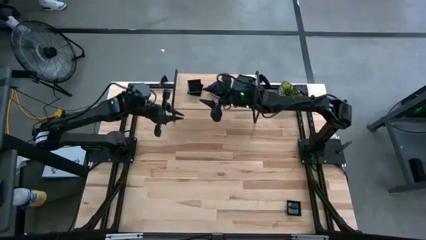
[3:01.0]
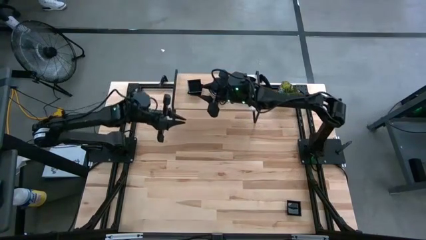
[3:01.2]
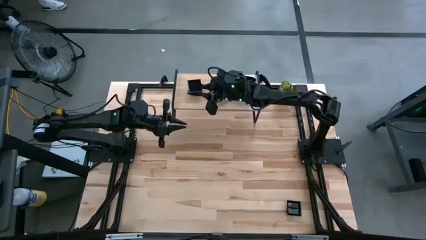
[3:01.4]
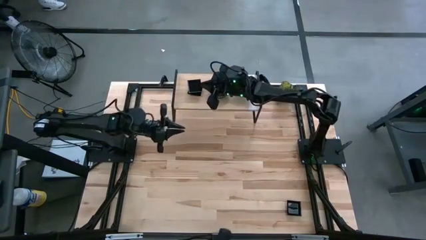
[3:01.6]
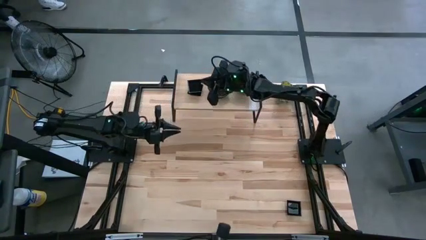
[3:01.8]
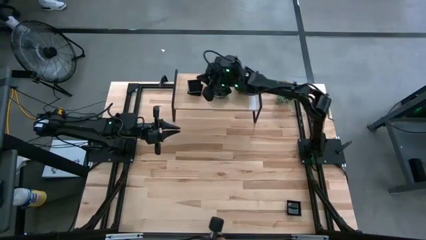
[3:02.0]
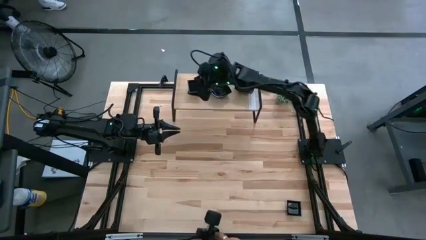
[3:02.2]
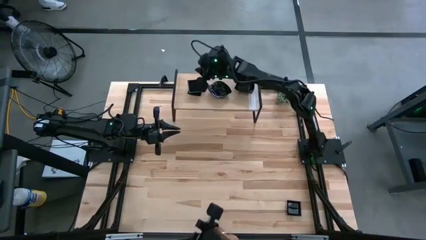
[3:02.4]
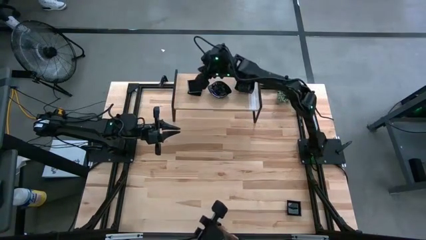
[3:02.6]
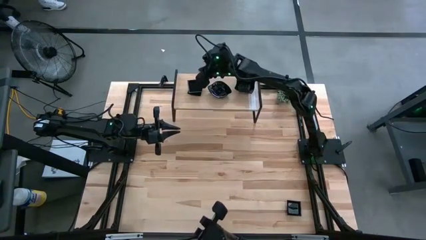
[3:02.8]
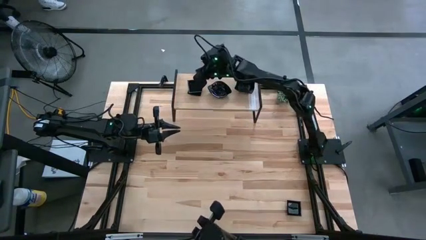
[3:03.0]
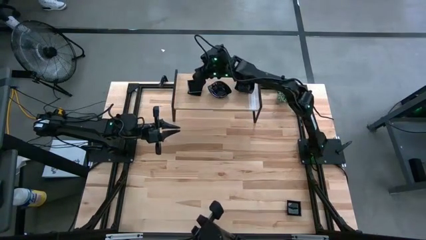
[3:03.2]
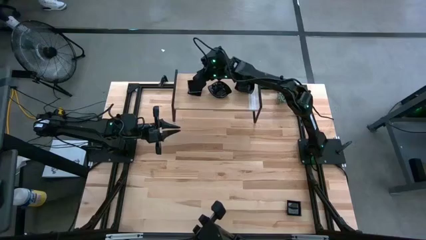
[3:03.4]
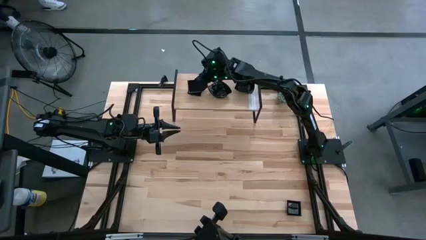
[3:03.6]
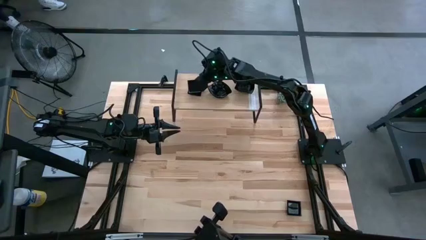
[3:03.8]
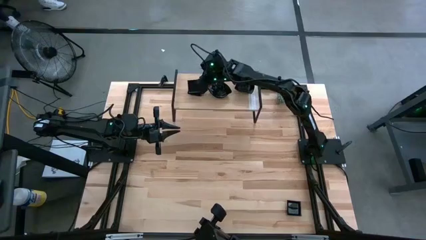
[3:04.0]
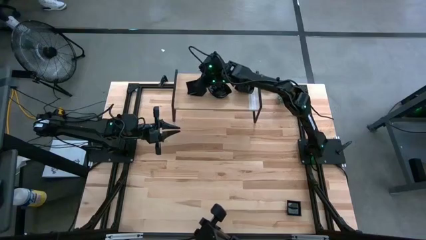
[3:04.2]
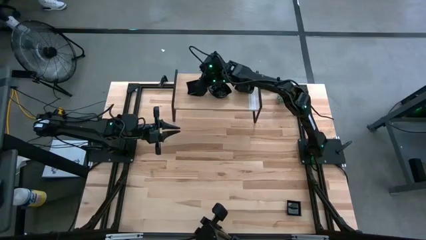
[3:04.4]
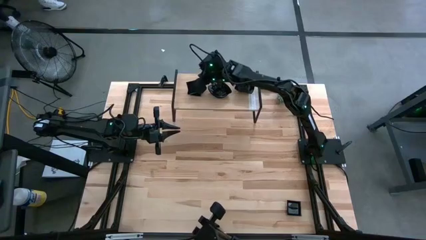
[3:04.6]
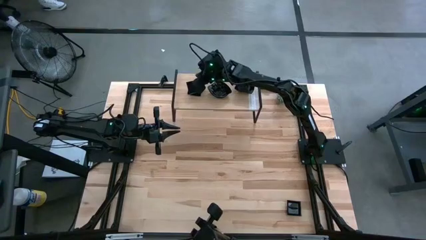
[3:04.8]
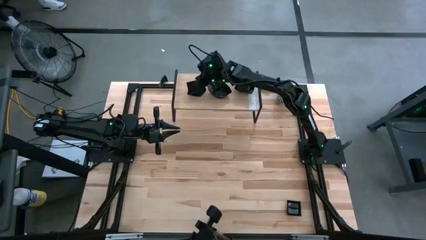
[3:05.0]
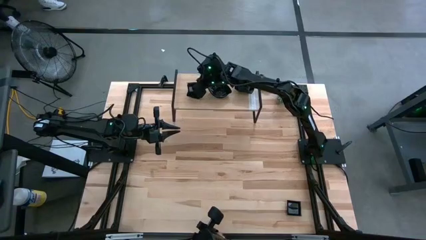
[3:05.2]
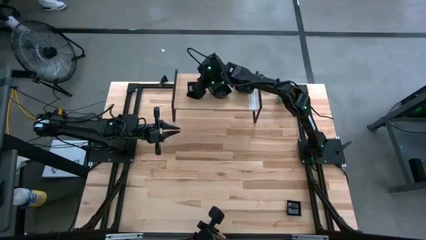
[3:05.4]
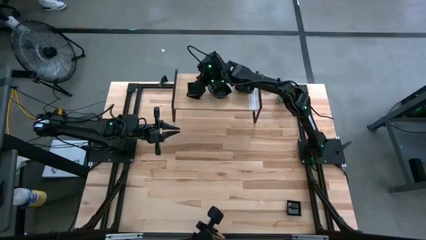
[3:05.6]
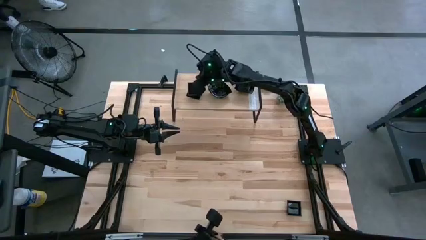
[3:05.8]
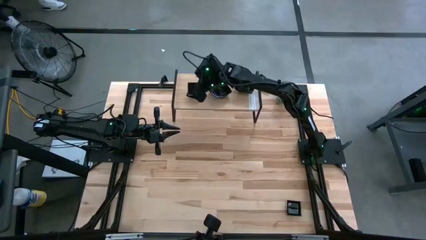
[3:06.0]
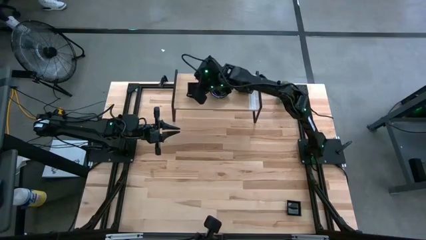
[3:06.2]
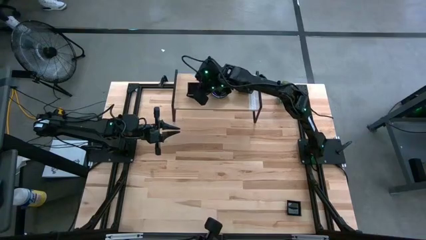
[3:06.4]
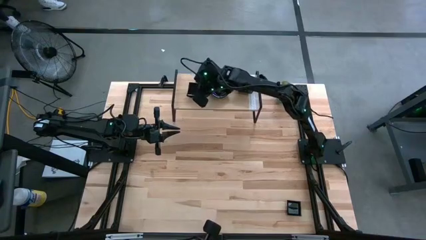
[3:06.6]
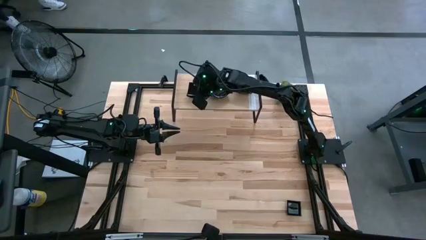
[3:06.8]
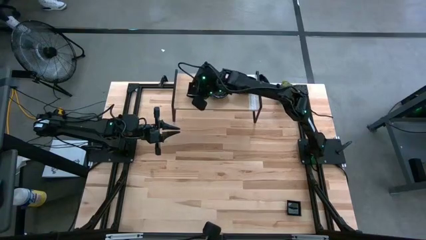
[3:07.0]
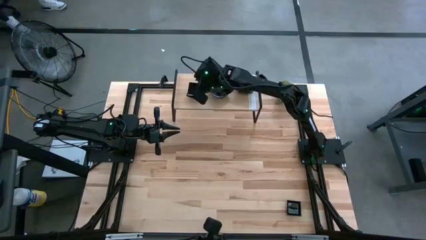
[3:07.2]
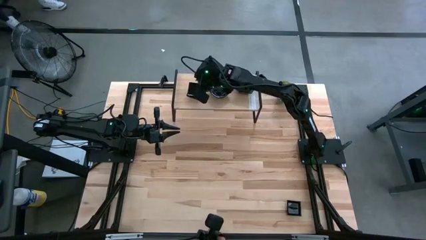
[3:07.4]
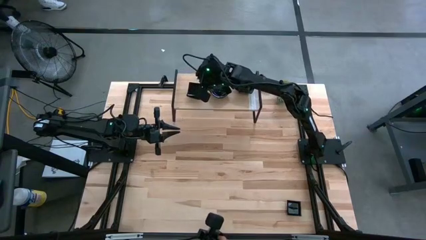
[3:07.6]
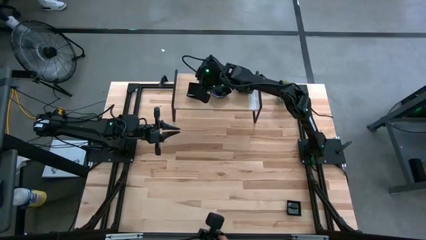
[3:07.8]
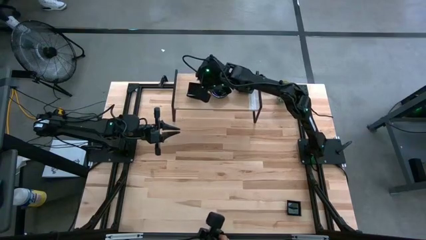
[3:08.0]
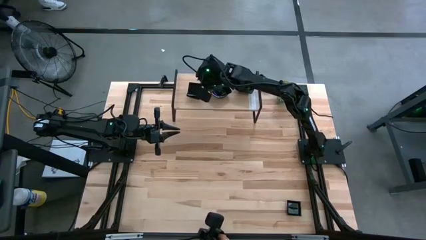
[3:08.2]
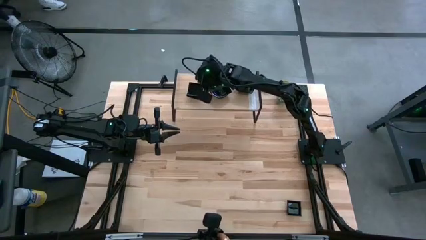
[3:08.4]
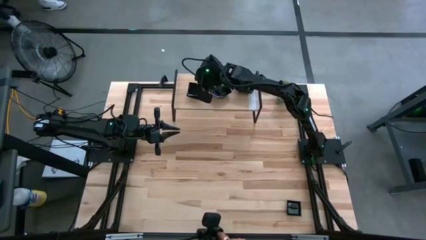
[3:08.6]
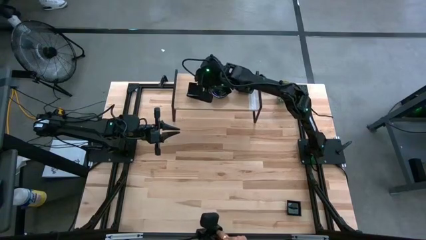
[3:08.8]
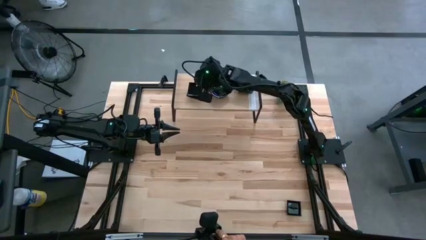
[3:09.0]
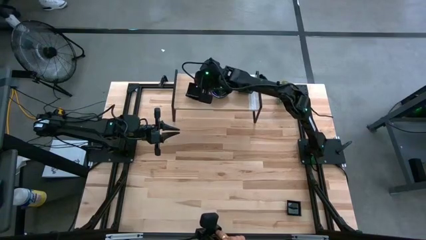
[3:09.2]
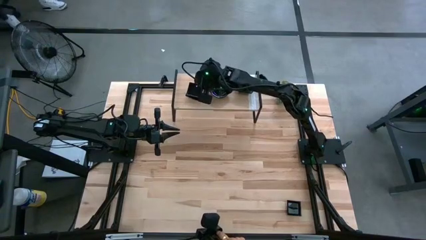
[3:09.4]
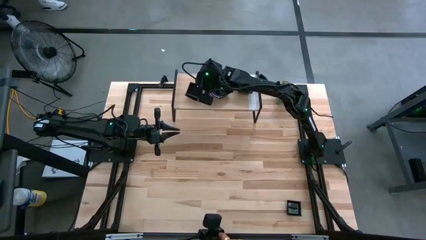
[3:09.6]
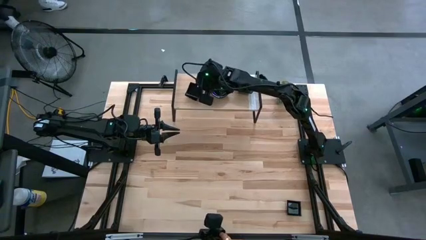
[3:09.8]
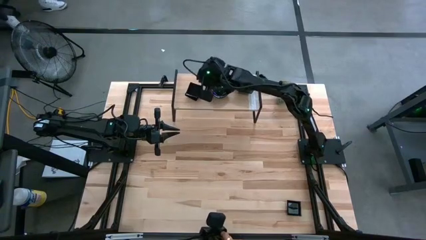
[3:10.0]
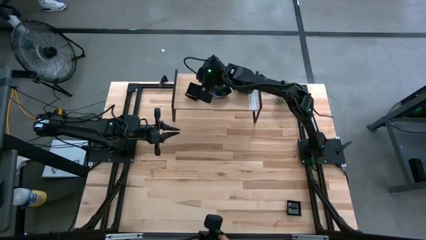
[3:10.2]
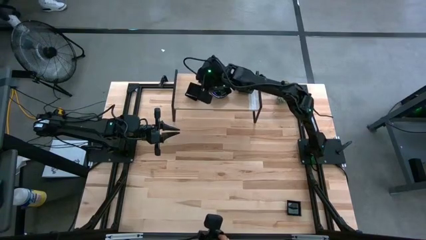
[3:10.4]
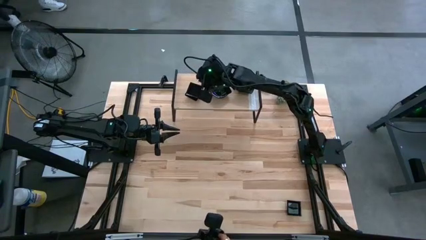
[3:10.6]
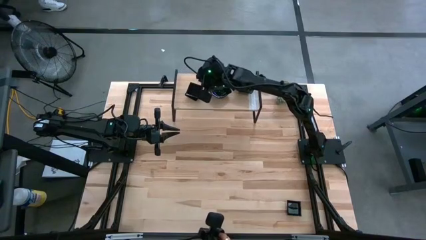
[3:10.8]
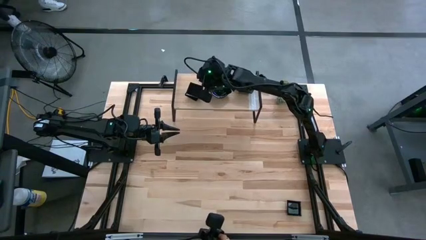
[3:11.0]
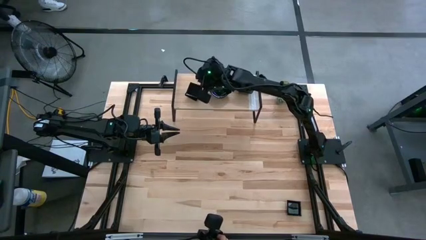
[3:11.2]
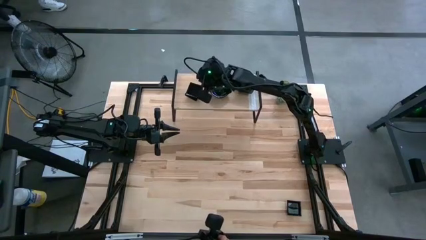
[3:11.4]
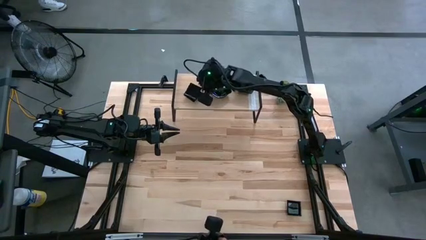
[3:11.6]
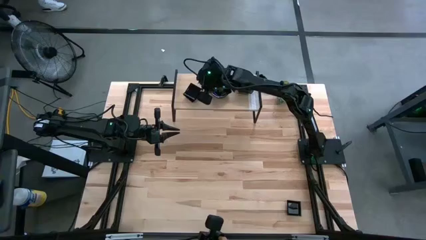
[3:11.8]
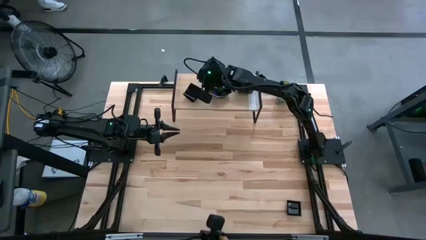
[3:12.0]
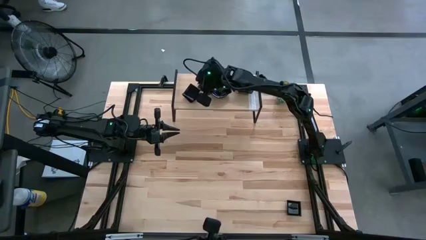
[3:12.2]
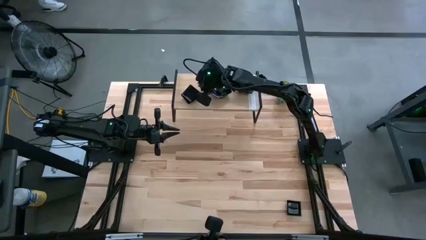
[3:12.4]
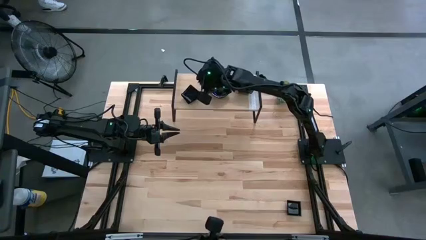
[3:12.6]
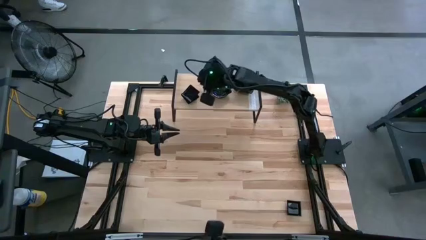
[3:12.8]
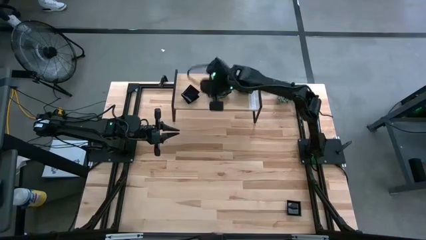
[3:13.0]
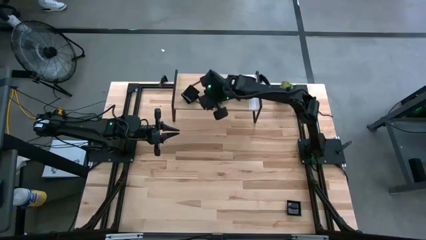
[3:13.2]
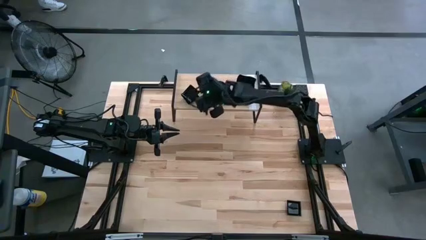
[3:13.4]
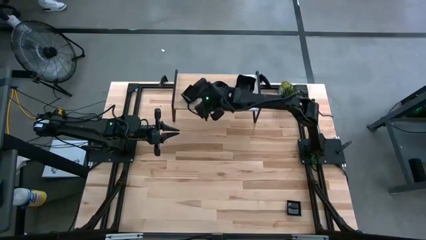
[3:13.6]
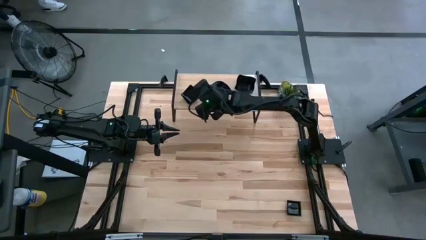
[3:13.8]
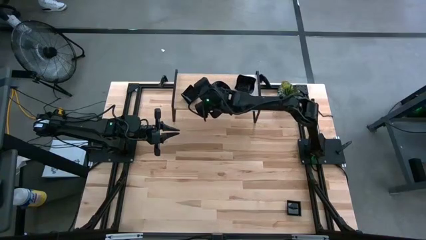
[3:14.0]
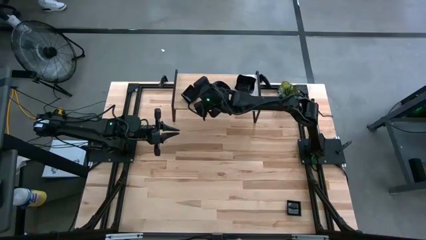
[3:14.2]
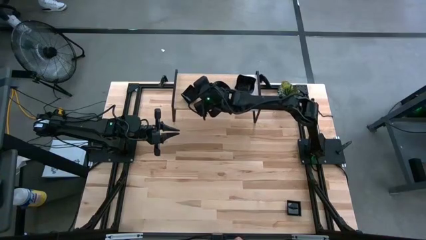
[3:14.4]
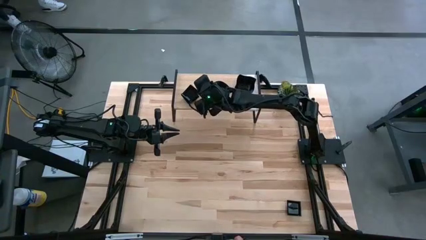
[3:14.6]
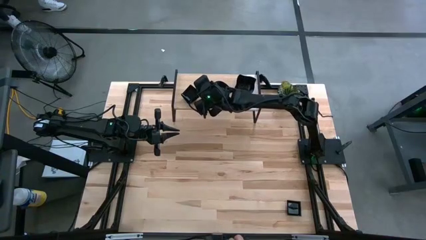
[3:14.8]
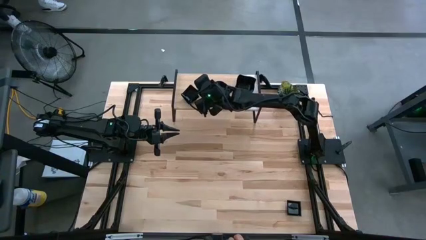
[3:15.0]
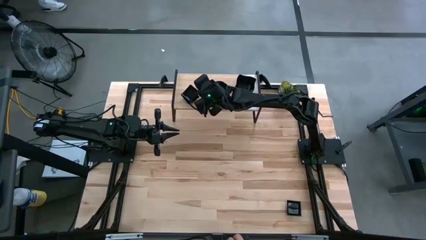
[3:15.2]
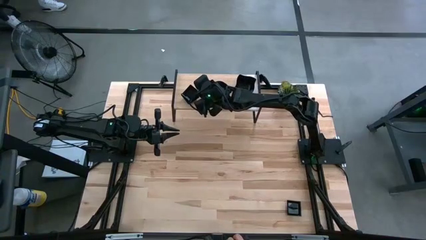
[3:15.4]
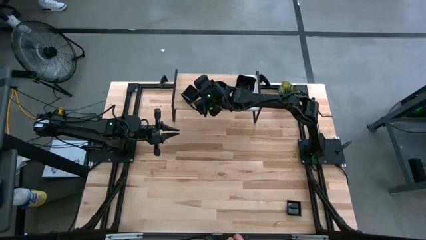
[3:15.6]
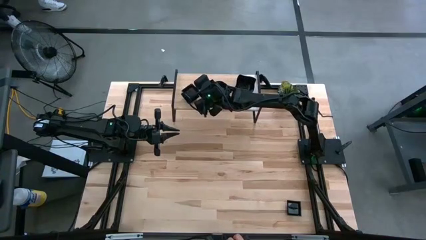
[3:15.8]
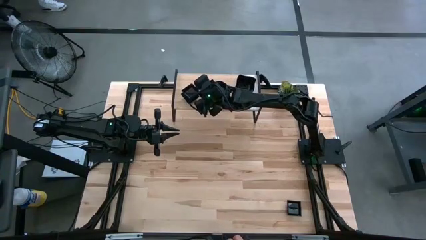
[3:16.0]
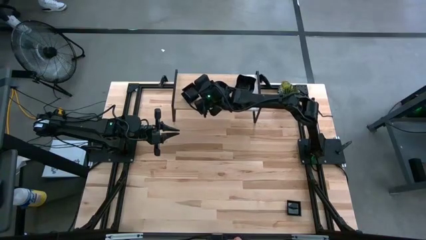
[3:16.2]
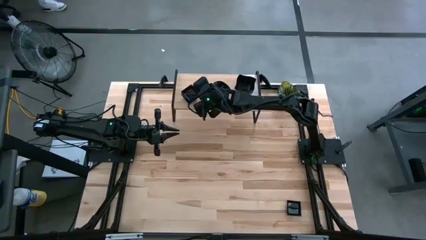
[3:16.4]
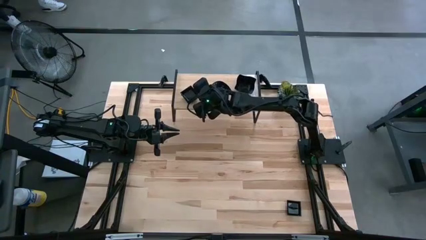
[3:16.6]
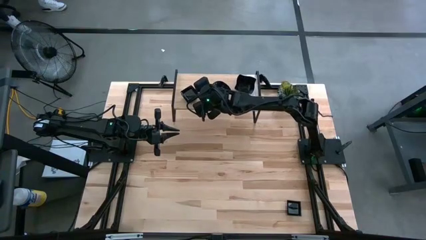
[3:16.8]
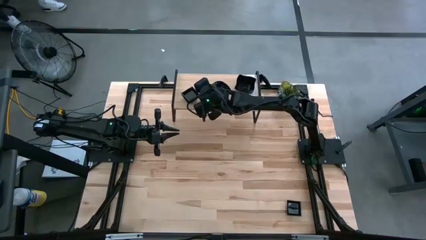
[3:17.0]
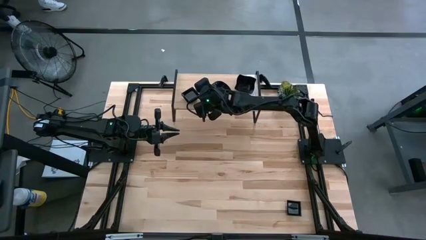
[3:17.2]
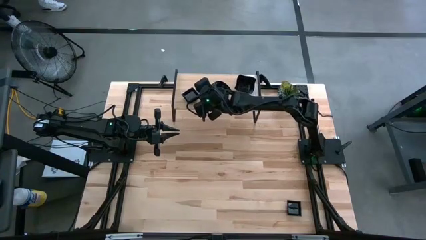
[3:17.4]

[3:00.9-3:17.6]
Task: Pick & Place Mini shaped plates
Stack the square plate on top of the other square plates on the shelf
